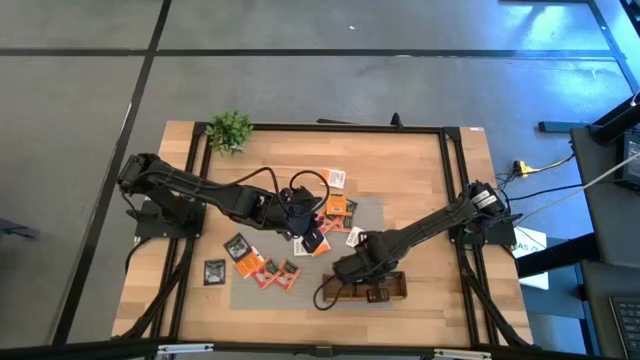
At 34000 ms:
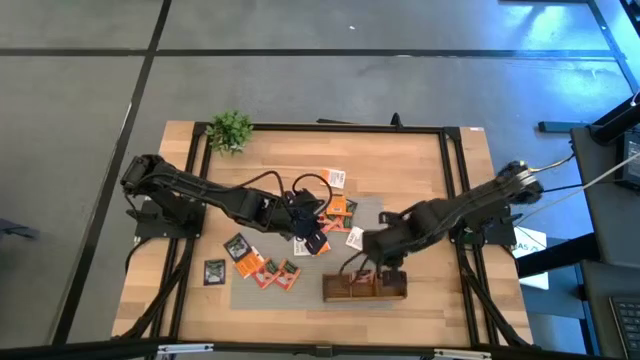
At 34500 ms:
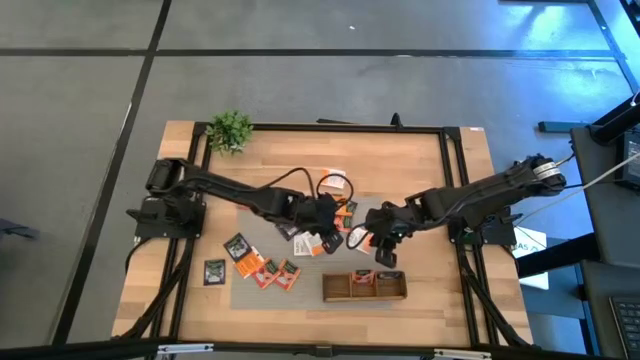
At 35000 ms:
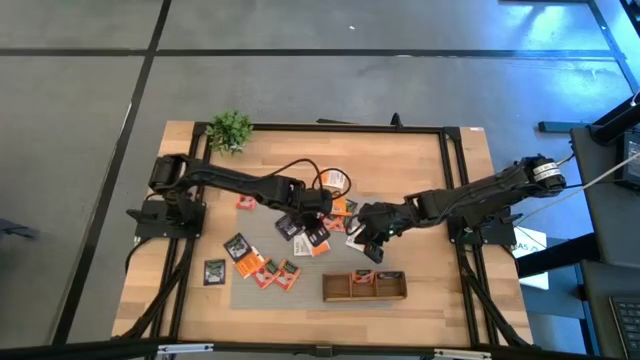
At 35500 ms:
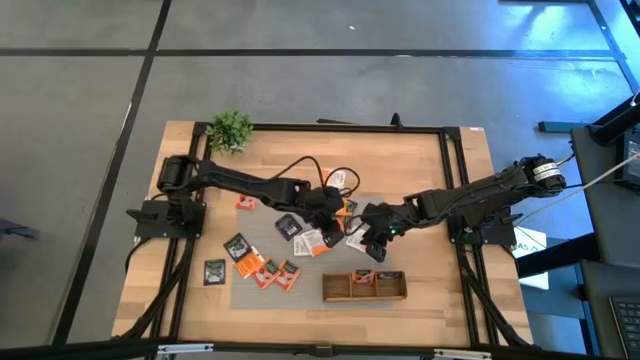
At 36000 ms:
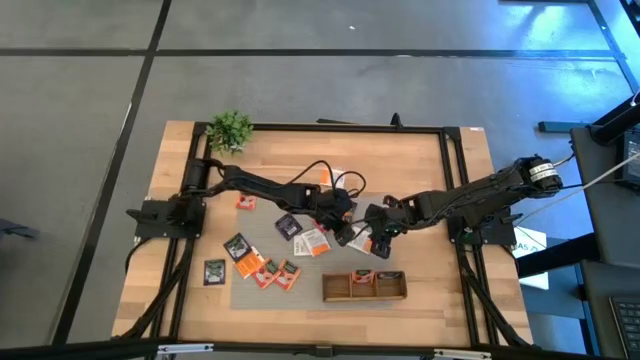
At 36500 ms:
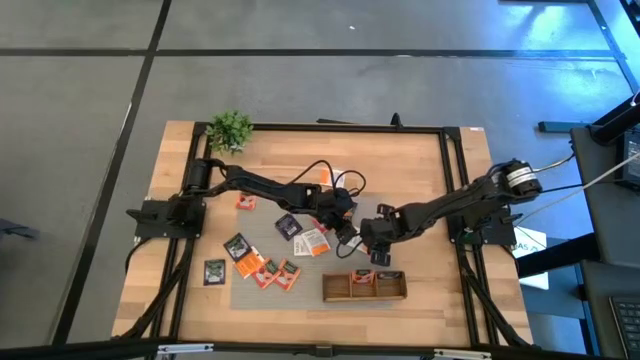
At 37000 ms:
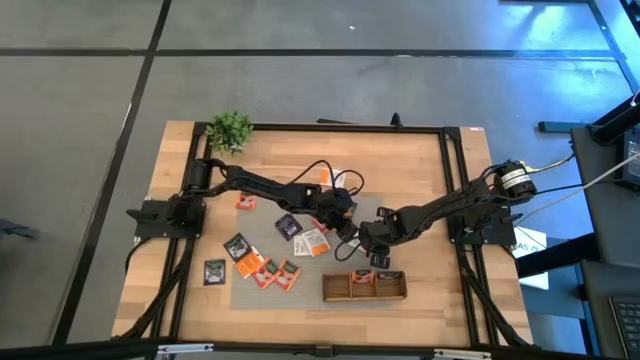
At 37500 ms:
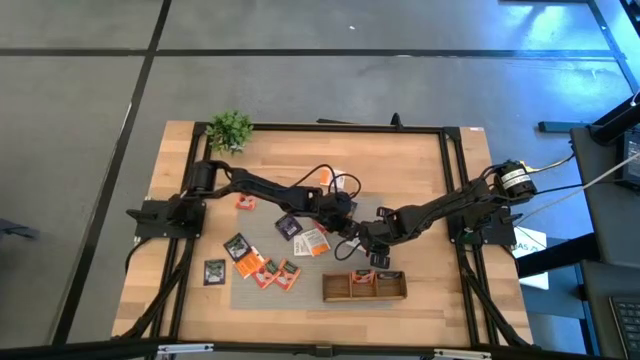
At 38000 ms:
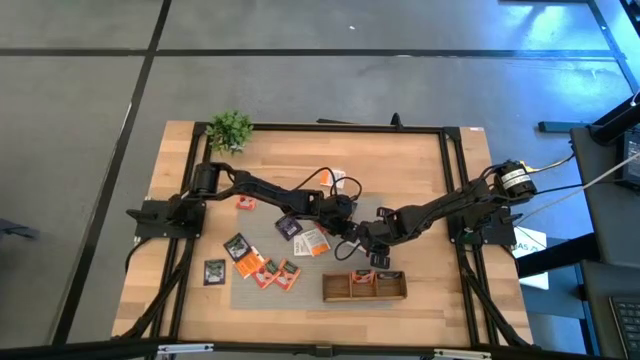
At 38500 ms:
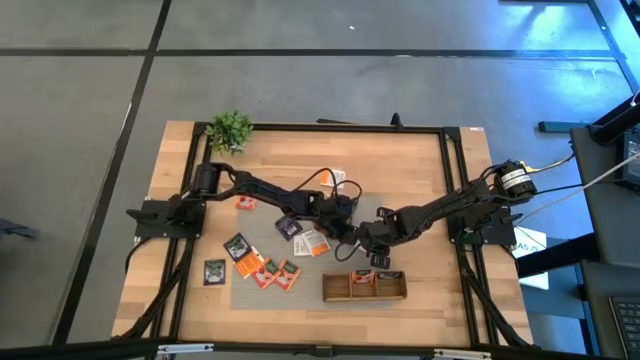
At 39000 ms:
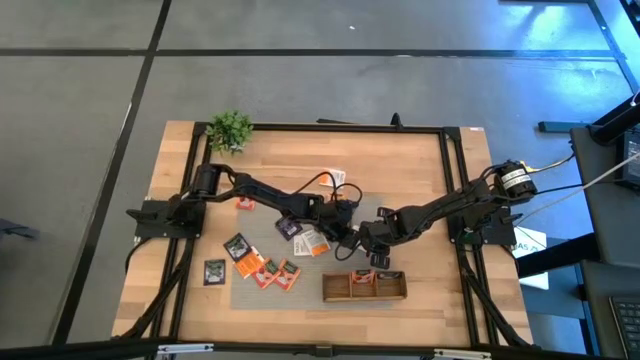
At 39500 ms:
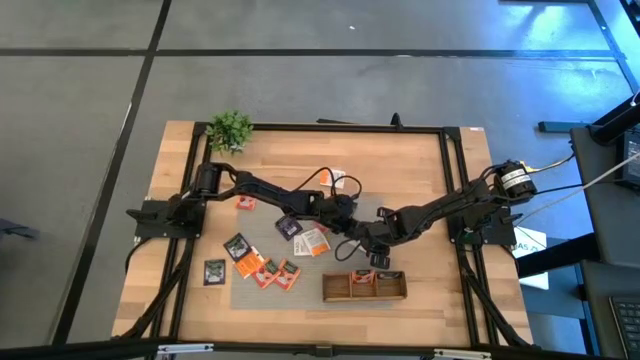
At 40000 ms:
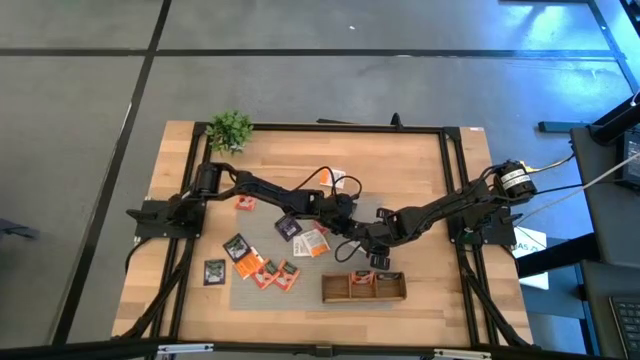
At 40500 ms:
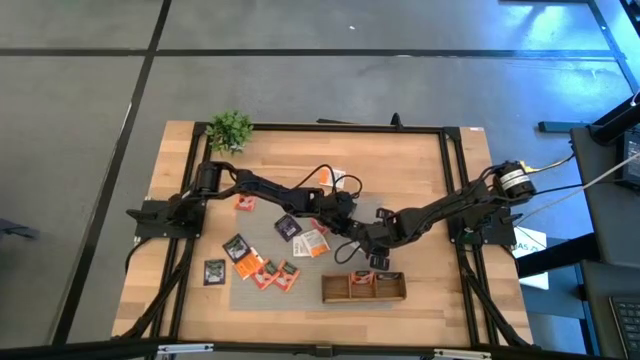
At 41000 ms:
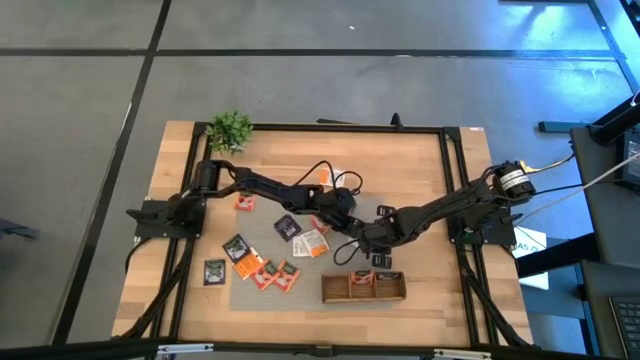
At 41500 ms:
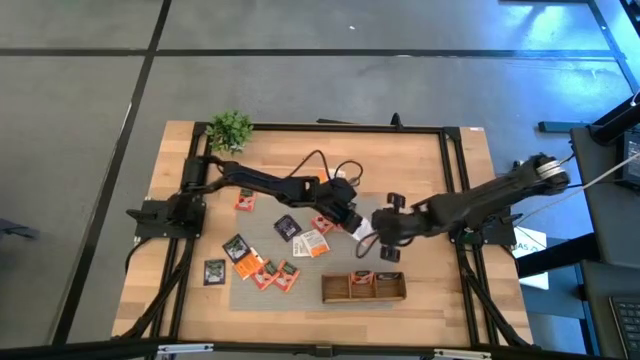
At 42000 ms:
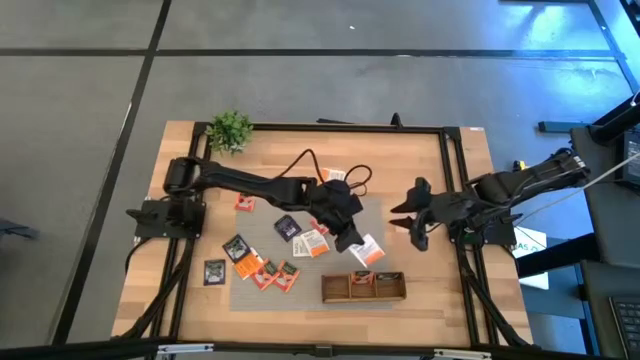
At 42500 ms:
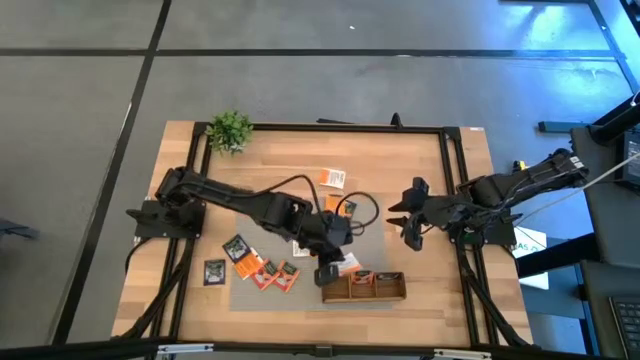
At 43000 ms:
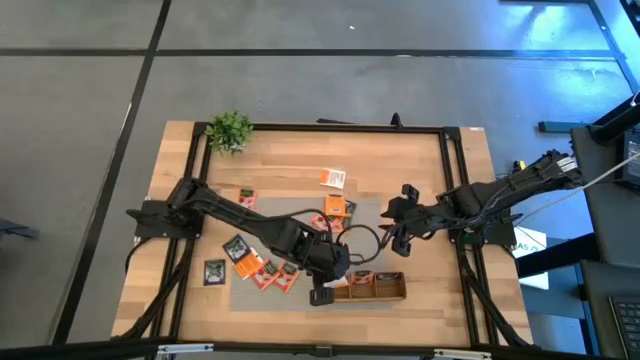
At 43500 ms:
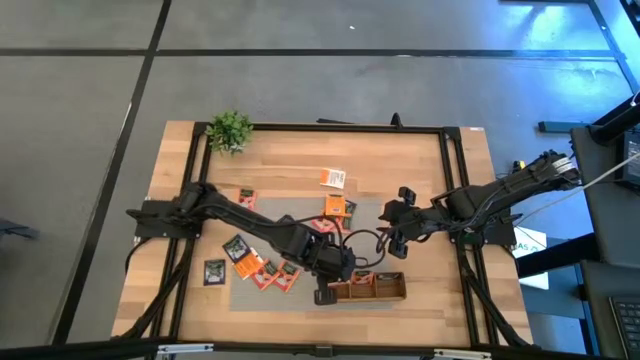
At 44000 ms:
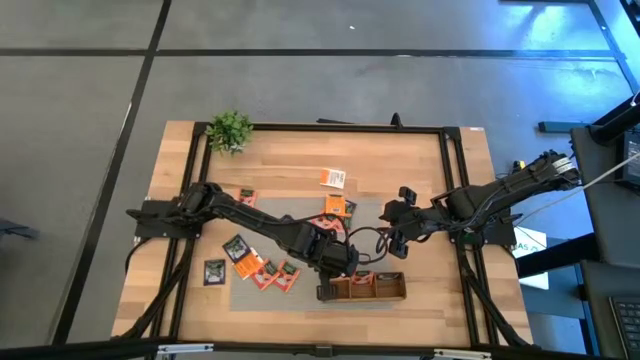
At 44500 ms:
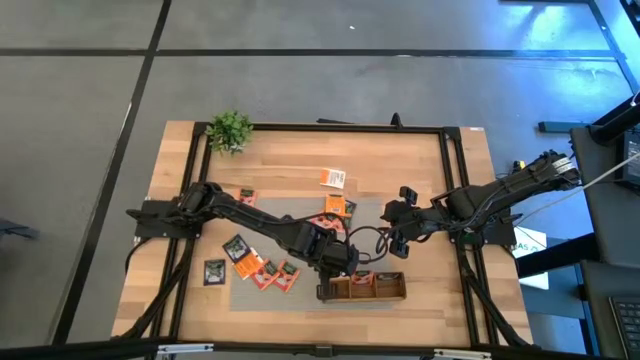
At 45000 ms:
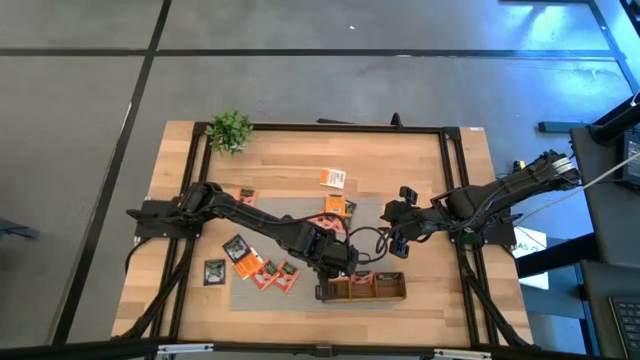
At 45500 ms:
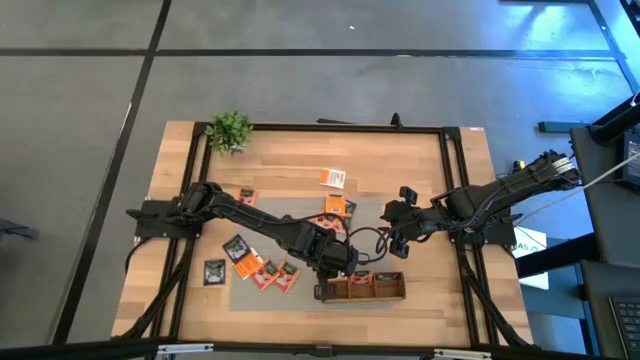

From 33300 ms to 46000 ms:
Task: Pick & Place Tea
Put the orange tea bag into the left compartment of the wooden organizer

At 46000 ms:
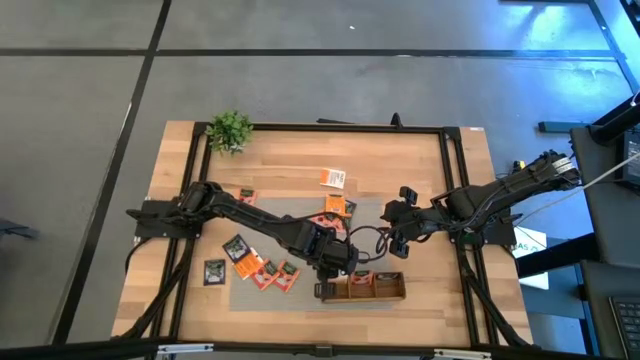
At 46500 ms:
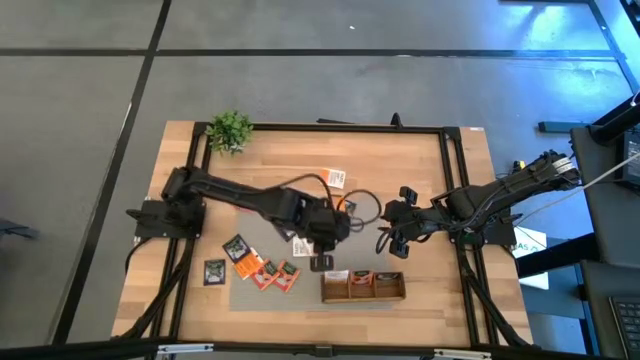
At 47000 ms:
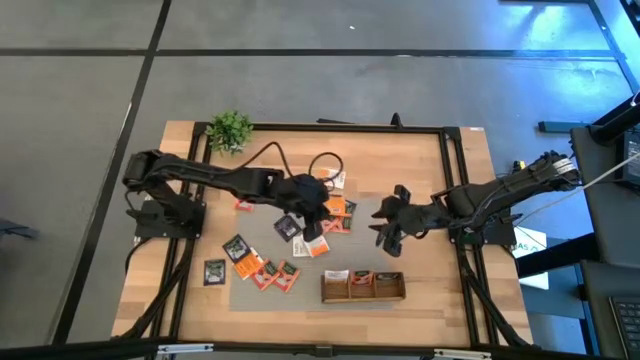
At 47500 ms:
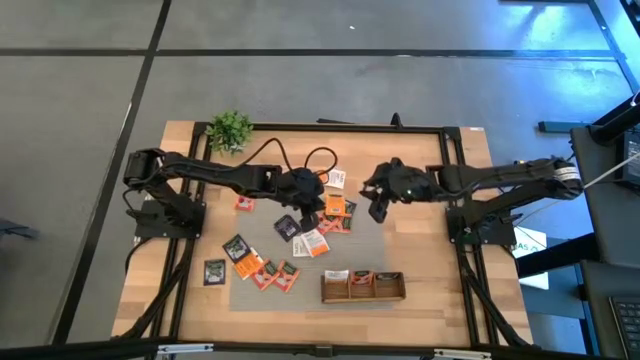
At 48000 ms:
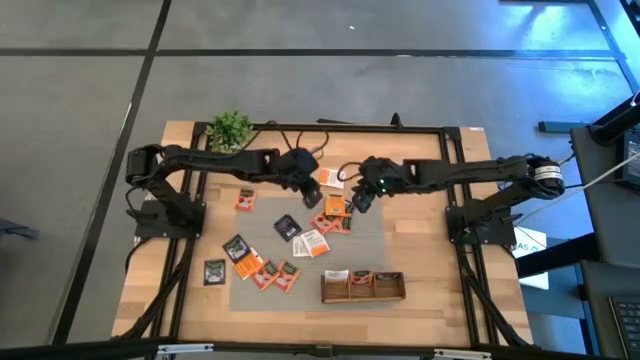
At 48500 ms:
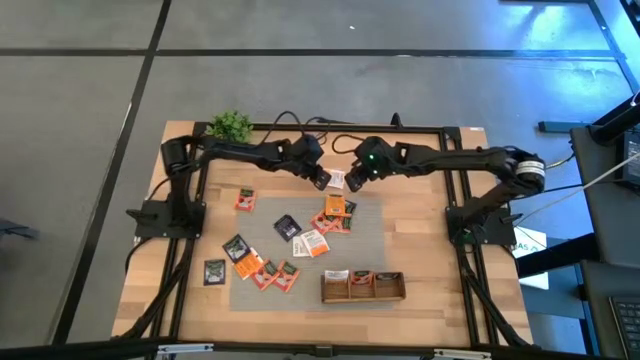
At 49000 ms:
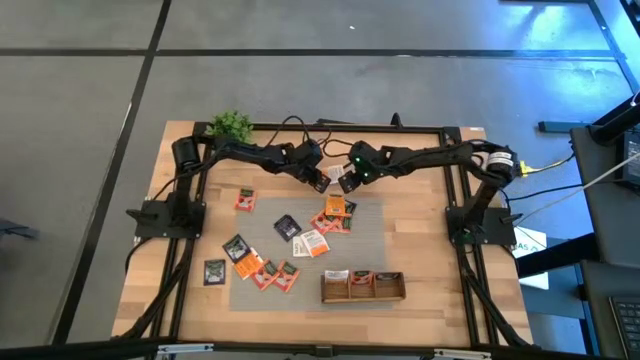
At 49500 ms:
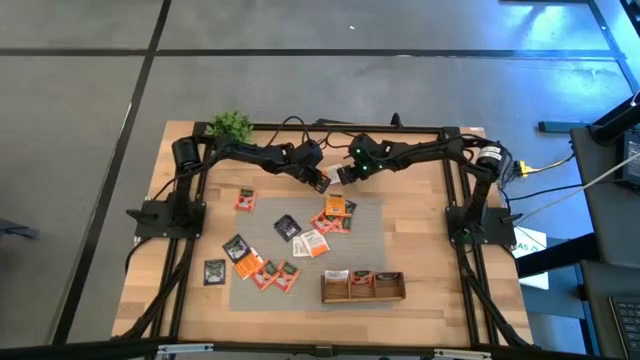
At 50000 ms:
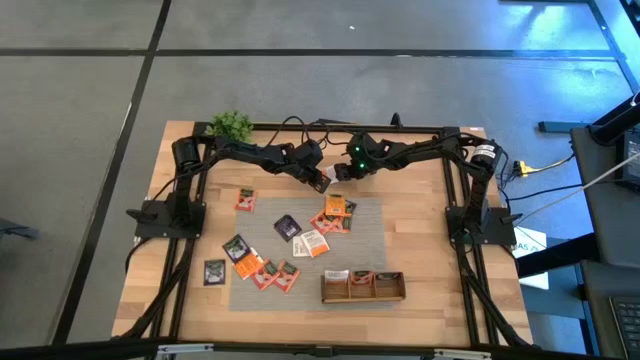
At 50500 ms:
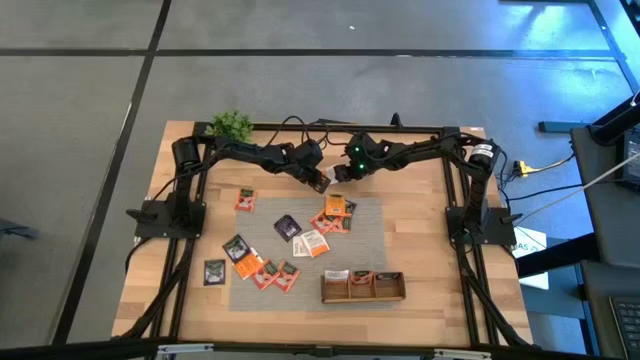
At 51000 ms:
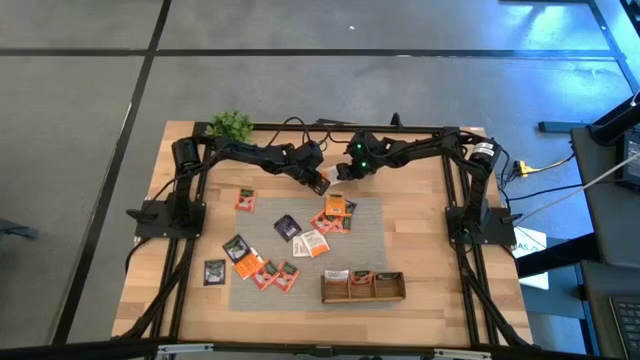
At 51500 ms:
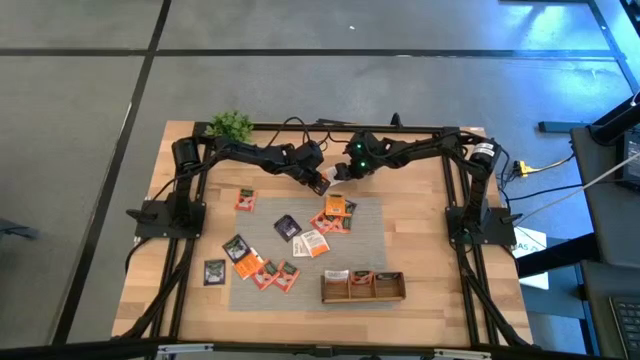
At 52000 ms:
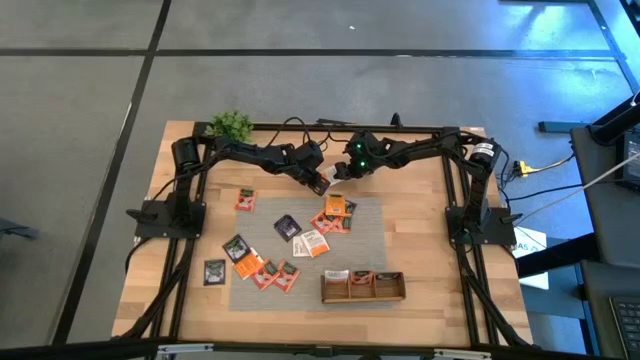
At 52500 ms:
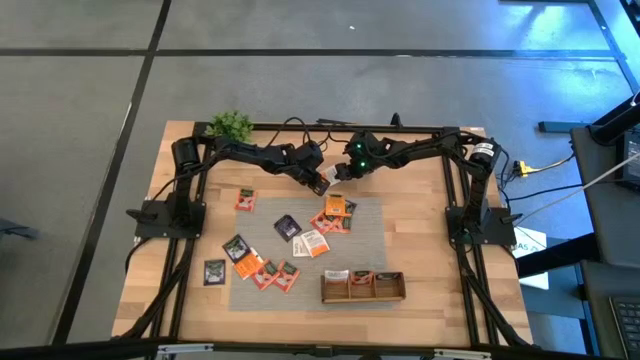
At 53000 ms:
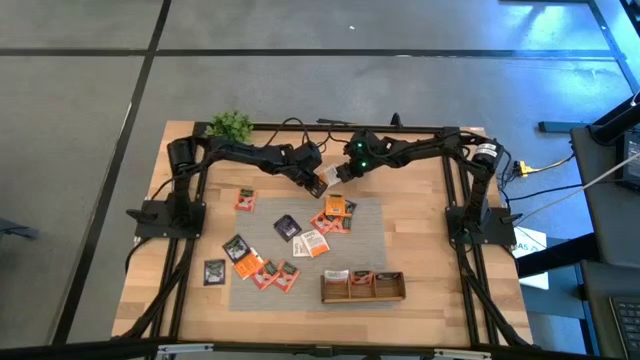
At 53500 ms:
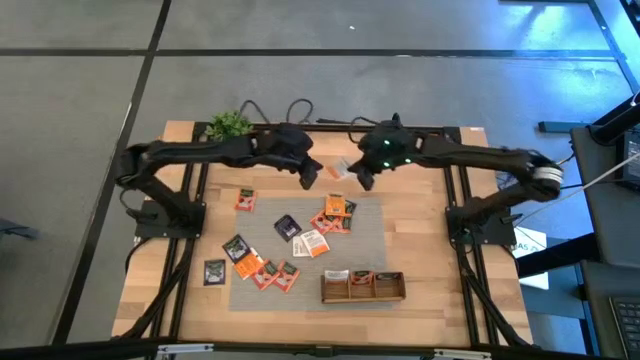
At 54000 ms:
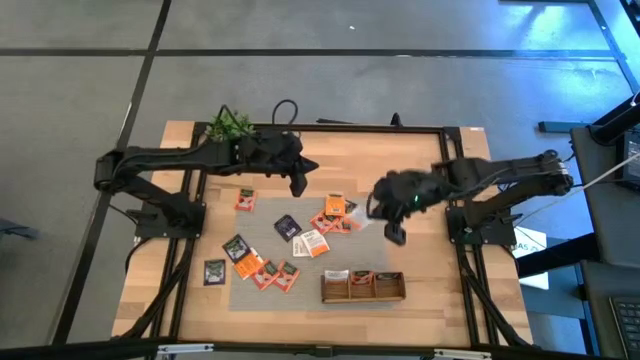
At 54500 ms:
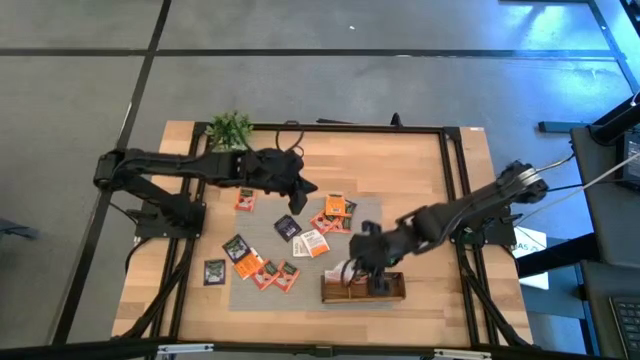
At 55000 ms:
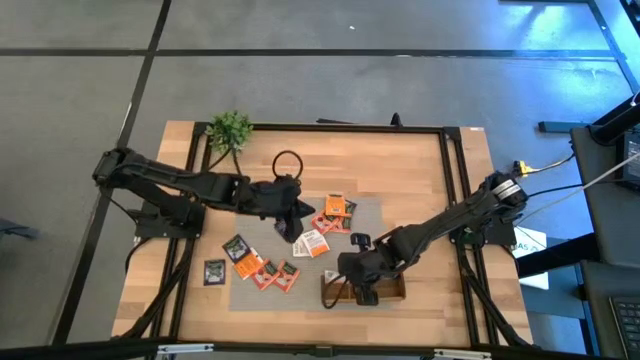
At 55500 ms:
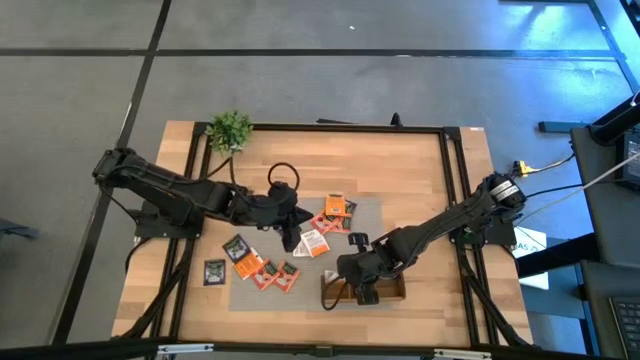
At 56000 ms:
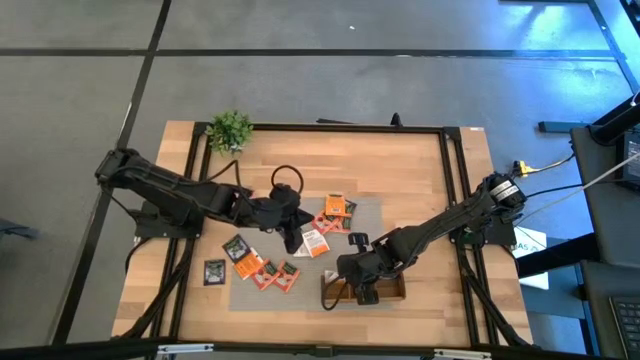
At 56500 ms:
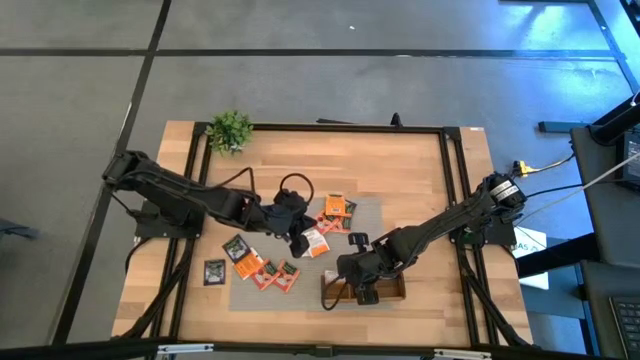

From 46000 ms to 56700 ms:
Put the orange tea bag into the left compartment of the wooden organizer
